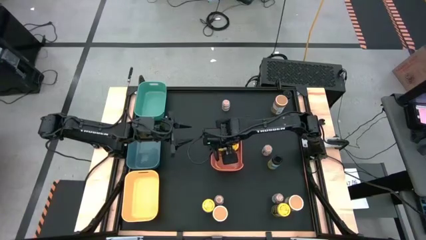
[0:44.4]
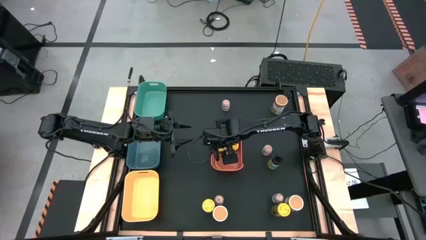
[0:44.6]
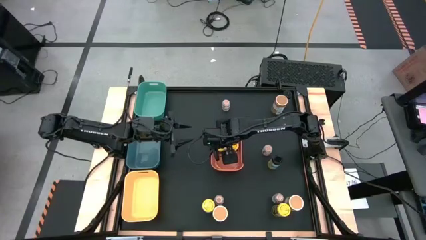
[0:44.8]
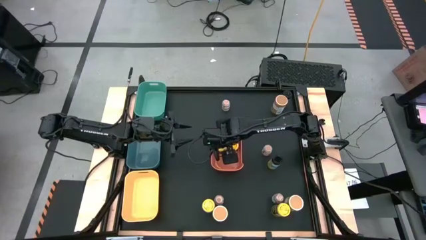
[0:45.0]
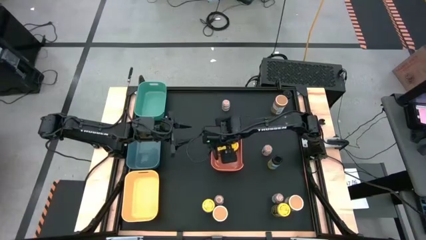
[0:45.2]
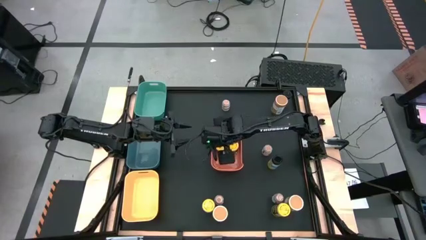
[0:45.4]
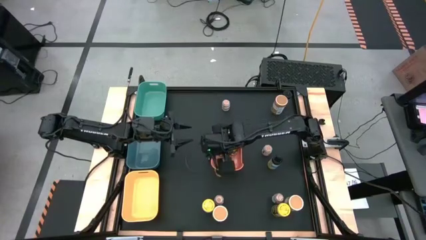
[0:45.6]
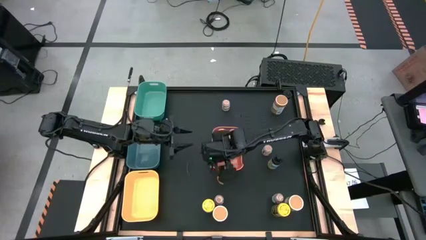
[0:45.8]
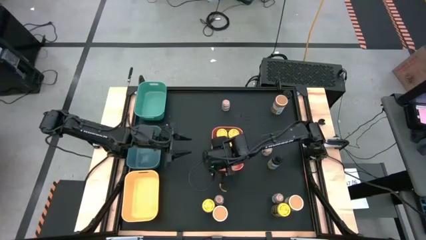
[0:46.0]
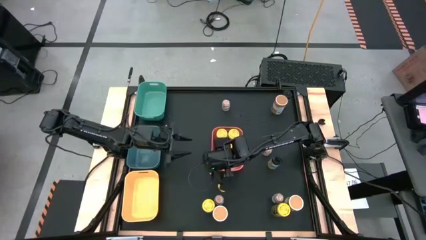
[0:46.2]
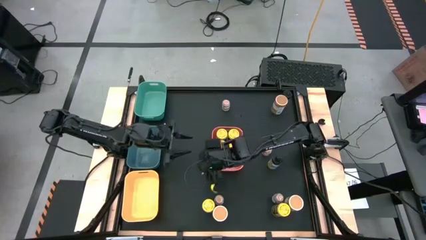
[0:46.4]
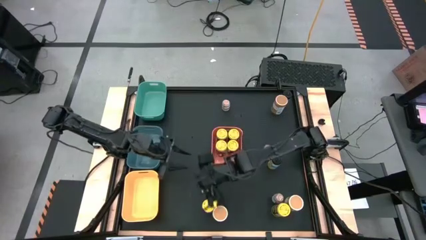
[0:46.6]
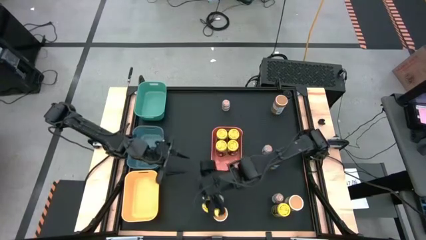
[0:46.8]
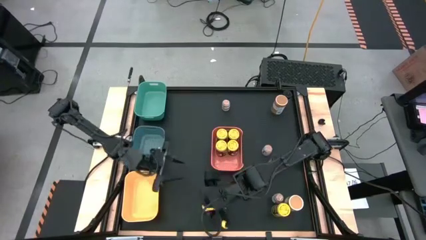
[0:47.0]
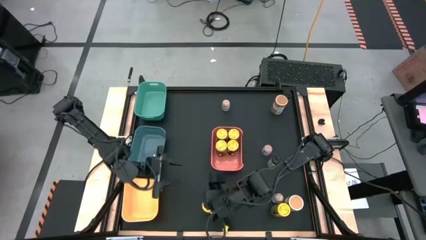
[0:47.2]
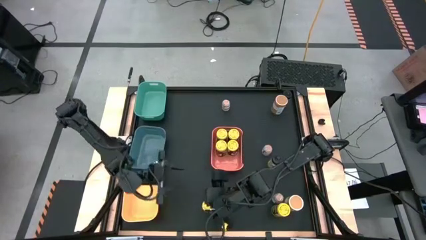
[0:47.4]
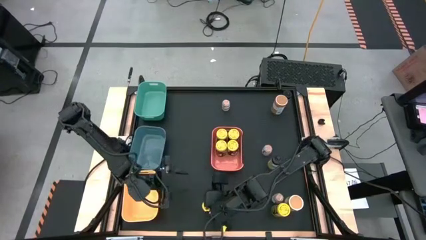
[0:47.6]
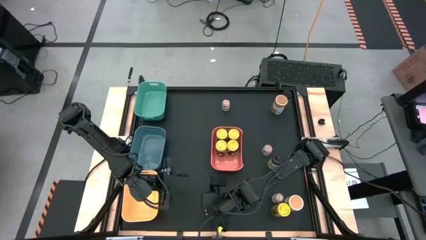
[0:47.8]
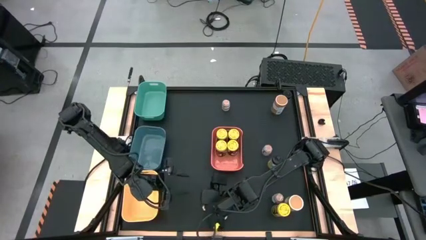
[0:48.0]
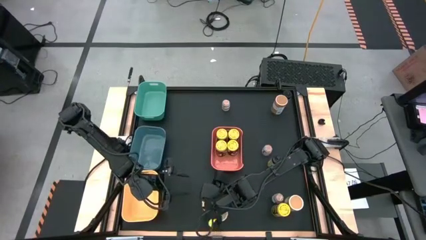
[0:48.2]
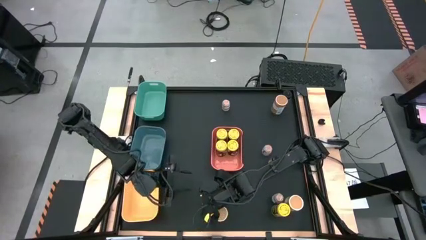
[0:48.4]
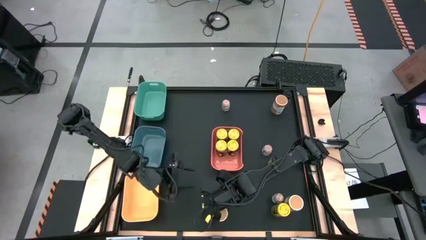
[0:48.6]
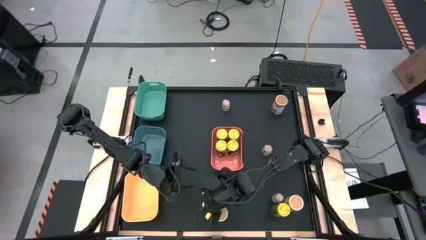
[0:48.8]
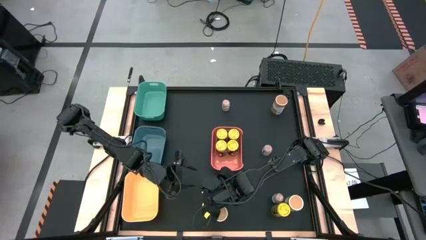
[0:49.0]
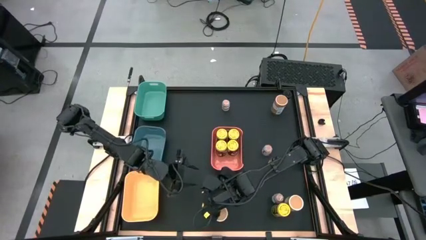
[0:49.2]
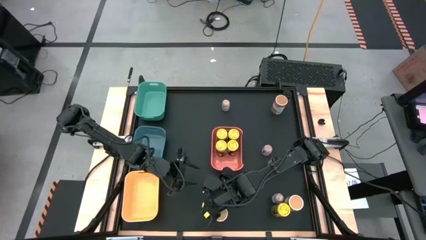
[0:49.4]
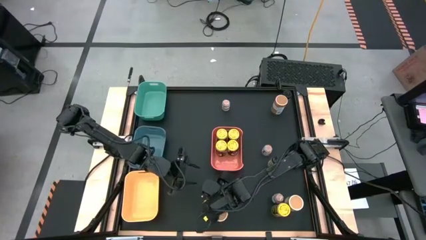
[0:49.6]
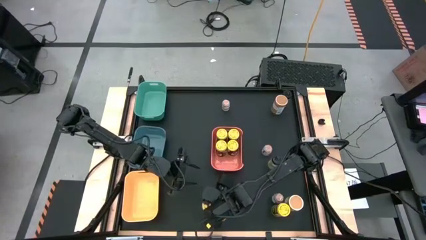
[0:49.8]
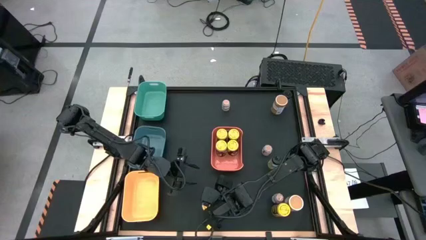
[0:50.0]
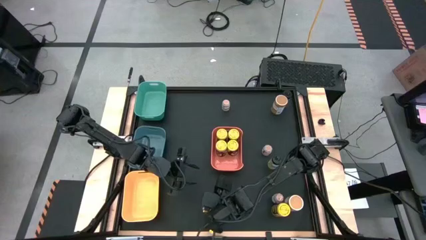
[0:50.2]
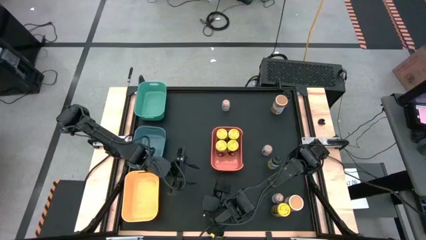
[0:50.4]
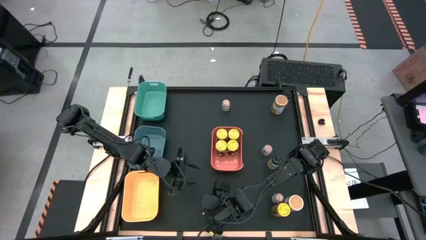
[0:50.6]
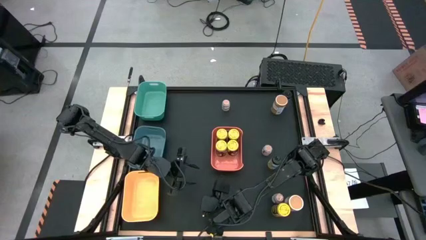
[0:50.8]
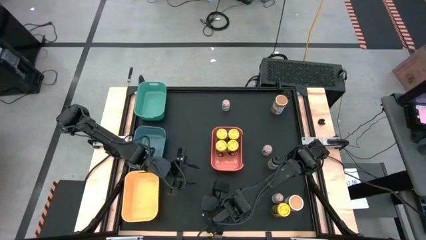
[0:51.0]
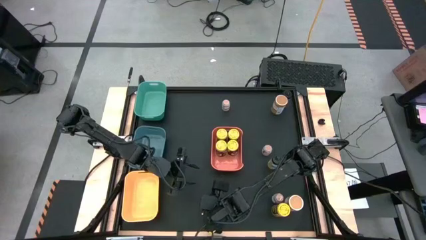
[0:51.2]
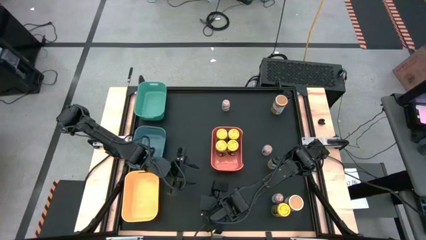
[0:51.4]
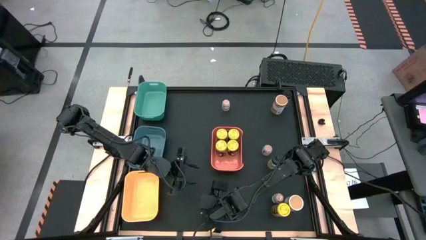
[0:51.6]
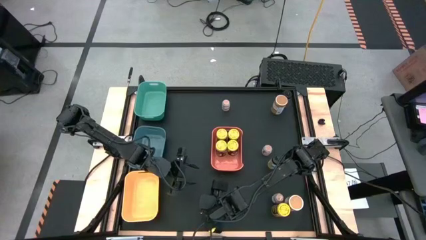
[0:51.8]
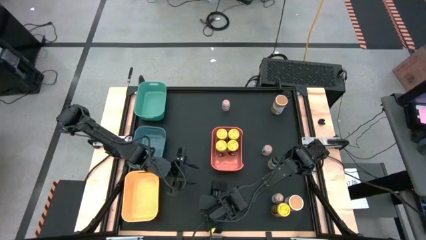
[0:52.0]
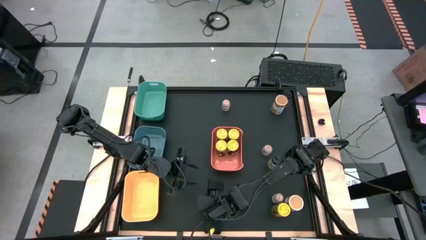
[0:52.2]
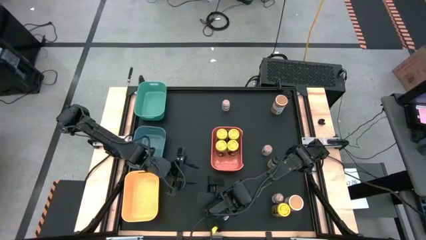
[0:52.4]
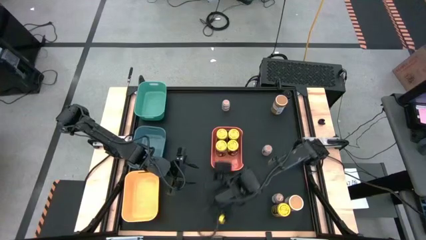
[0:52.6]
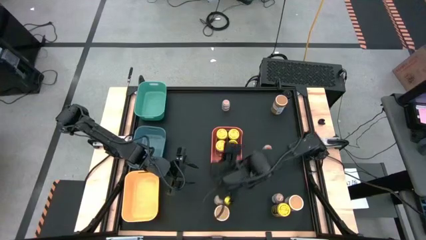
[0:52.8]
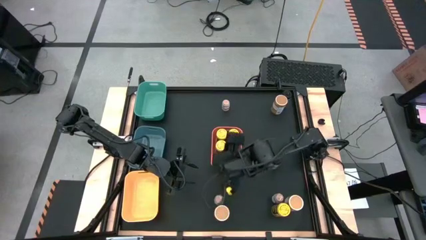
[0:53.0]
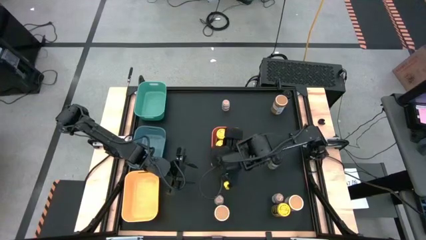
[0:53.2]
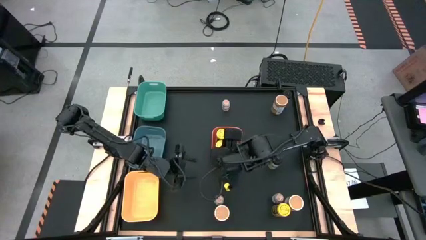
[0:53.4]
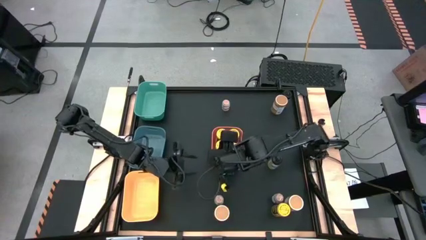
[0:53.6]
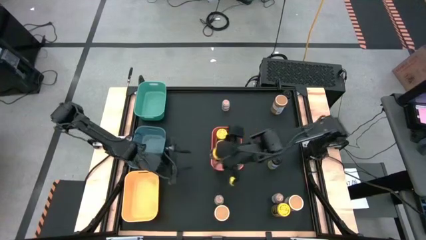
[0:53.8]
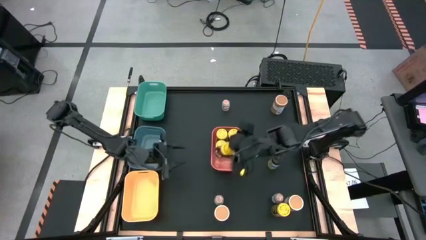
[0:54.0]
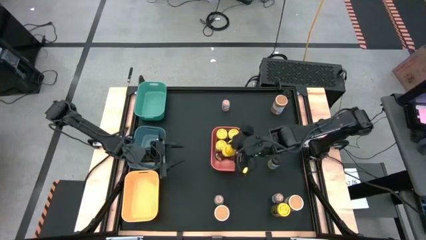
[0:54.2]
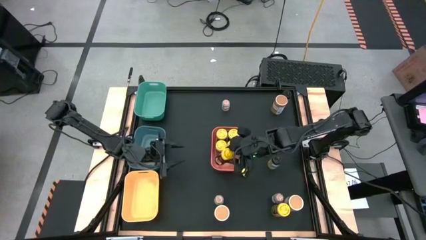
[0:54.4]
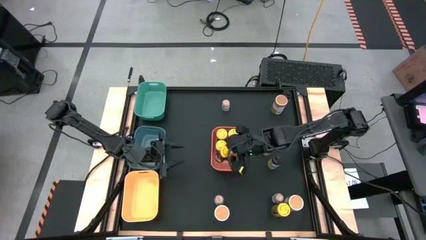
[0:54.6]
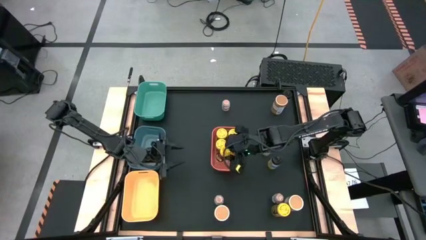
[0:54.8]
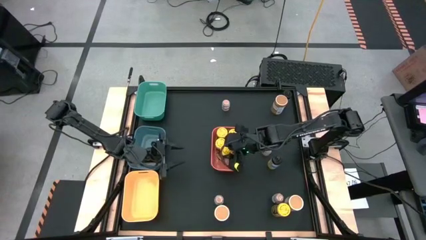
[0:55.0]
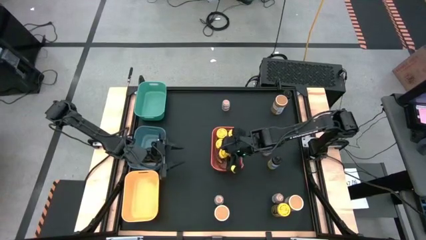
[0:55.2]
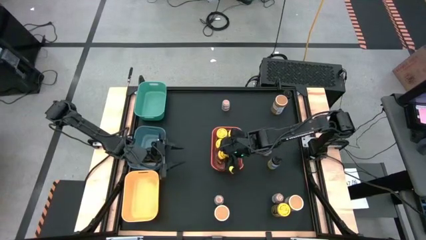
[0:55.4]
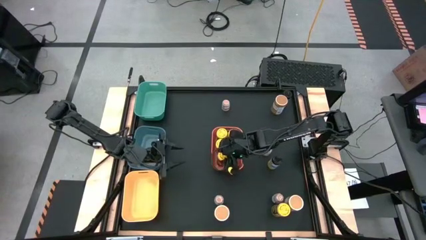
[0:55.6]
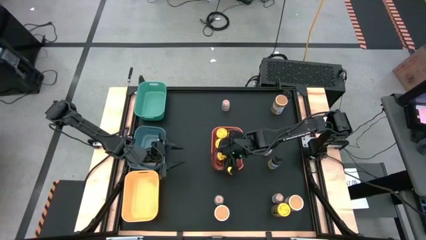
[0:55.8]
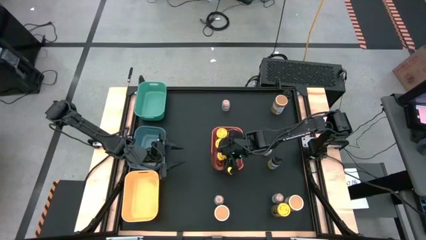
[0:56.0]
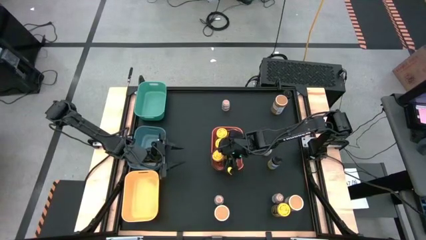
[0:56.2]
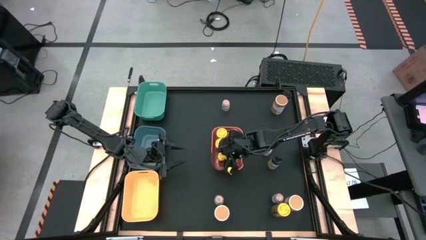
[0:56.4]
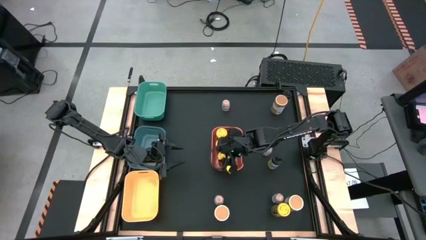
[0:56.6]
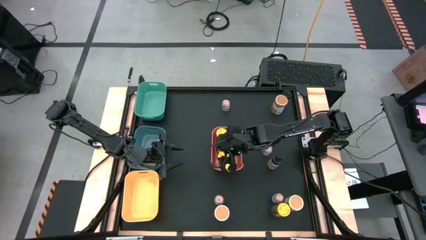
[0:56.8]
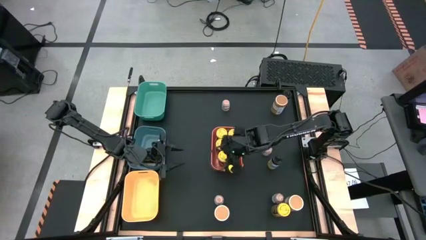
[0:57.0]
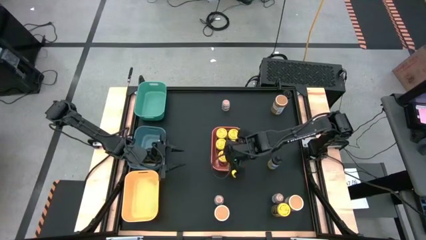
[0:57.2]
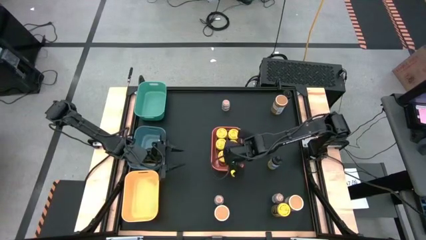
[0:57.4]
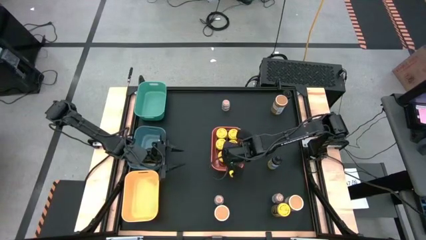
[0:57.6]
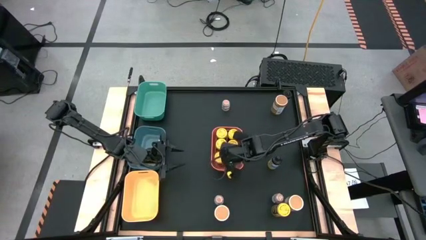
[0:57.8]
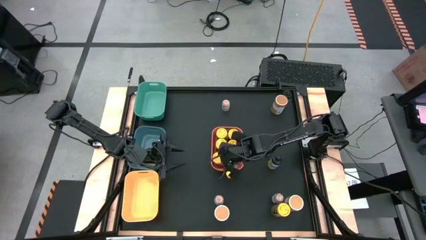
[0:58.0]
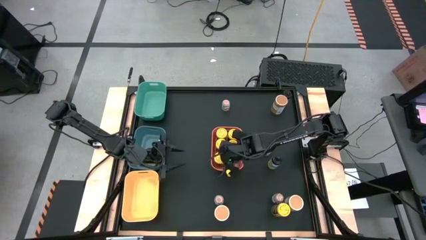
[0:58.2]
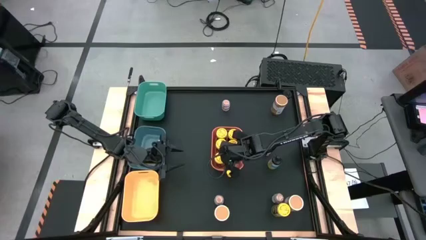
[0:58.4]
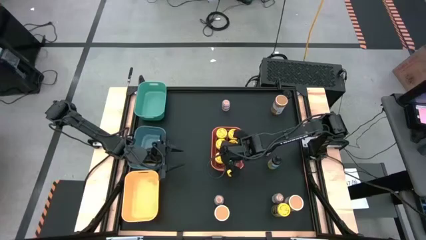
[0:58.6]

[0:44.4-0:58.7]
Task: Sort spices by type
Put the yellow seasoning can in the orange bin
